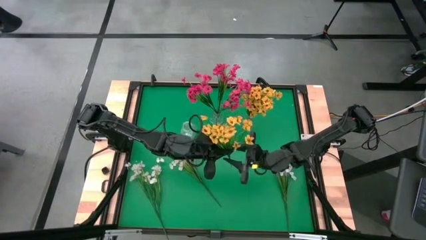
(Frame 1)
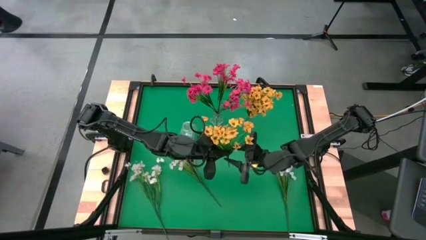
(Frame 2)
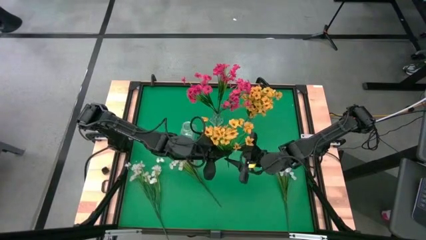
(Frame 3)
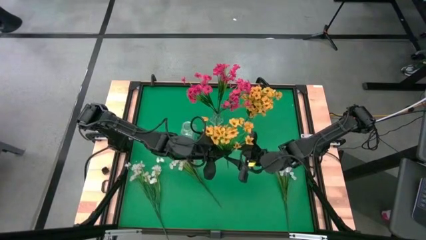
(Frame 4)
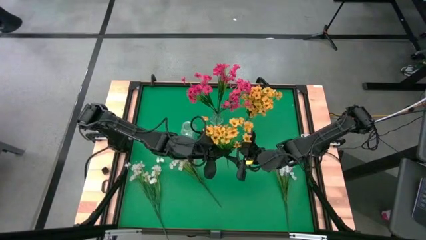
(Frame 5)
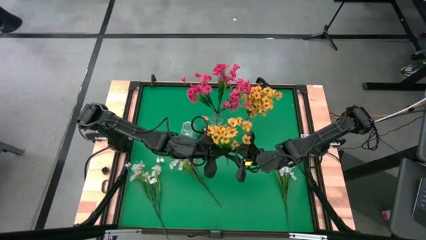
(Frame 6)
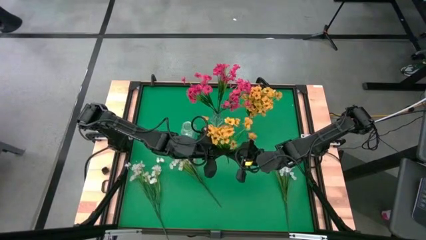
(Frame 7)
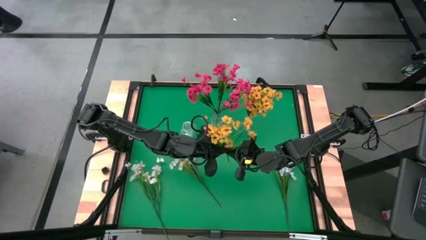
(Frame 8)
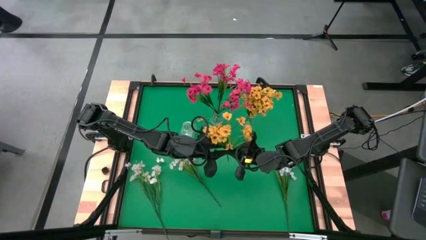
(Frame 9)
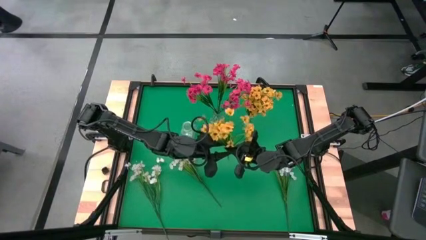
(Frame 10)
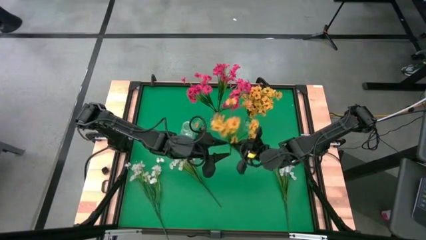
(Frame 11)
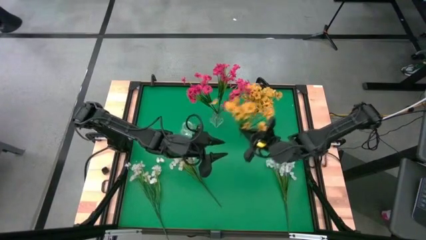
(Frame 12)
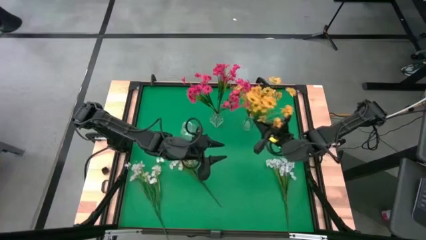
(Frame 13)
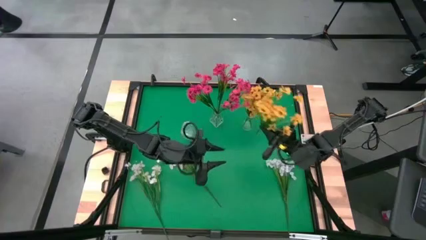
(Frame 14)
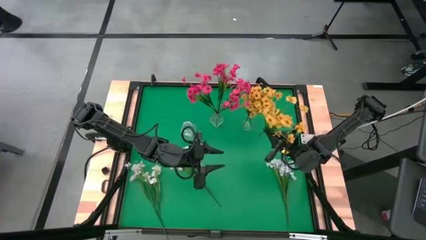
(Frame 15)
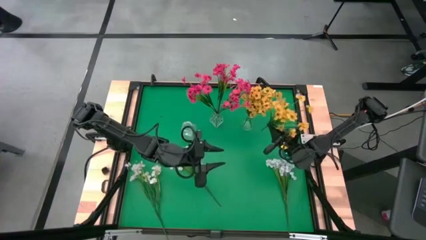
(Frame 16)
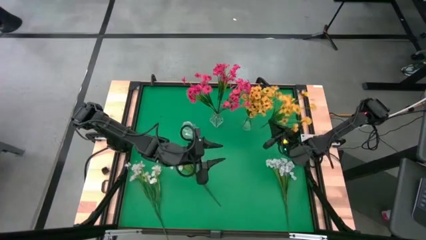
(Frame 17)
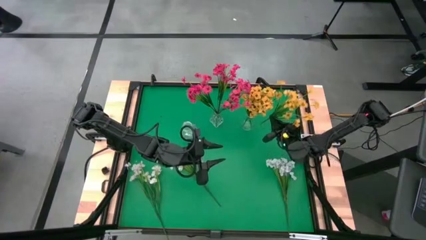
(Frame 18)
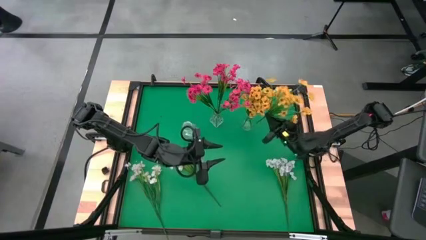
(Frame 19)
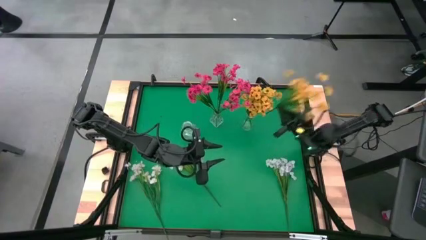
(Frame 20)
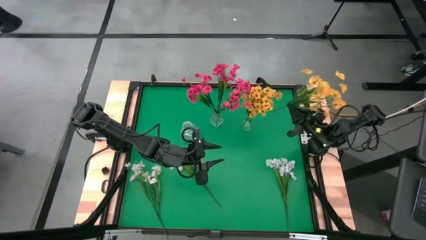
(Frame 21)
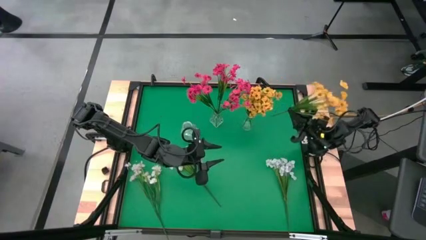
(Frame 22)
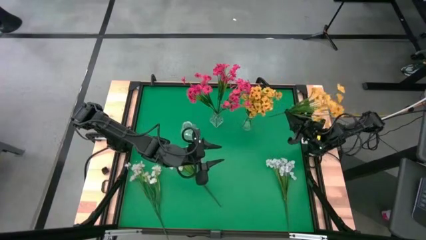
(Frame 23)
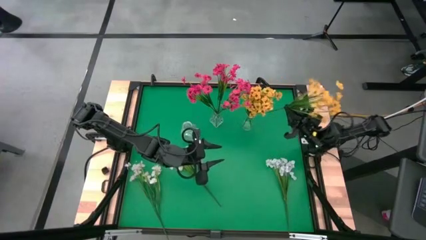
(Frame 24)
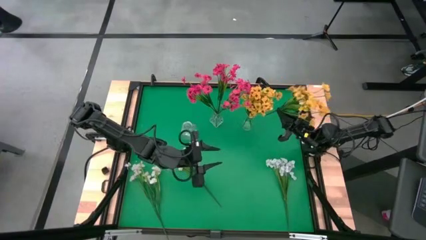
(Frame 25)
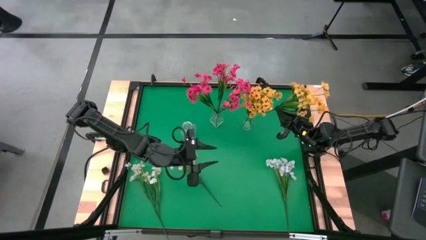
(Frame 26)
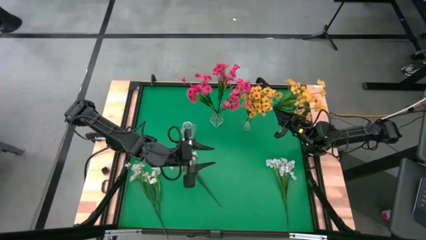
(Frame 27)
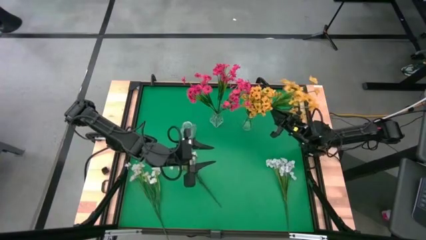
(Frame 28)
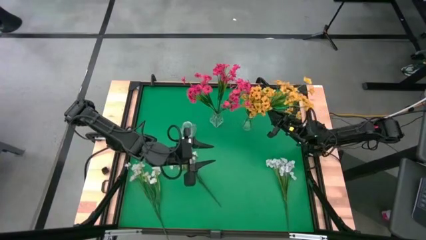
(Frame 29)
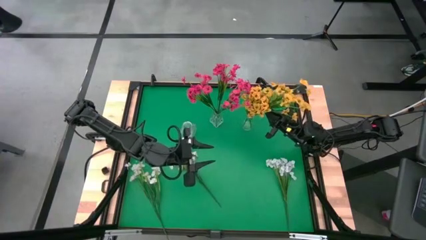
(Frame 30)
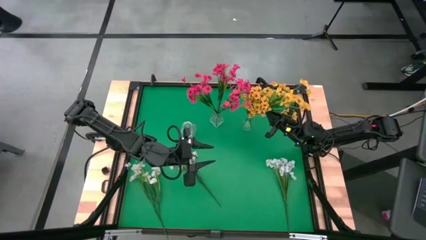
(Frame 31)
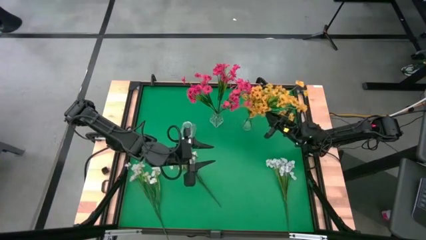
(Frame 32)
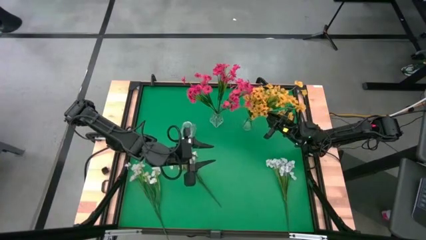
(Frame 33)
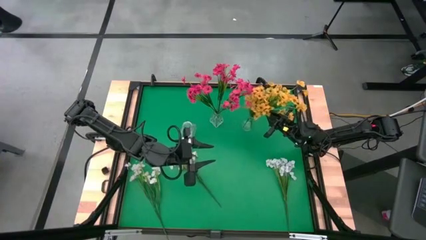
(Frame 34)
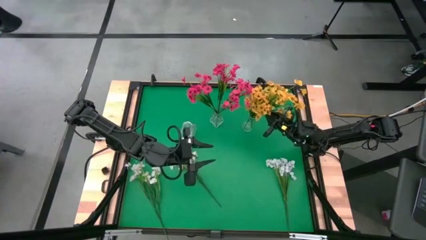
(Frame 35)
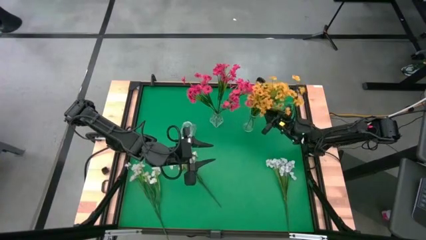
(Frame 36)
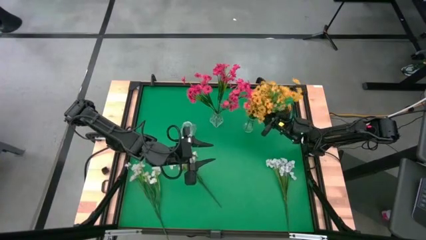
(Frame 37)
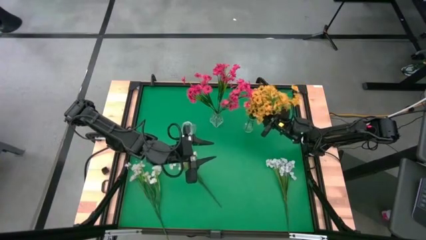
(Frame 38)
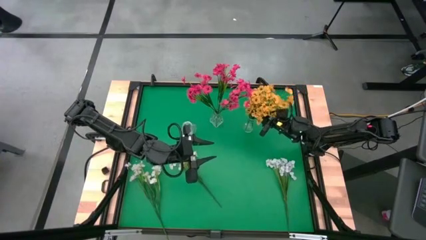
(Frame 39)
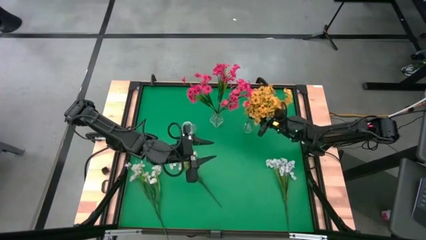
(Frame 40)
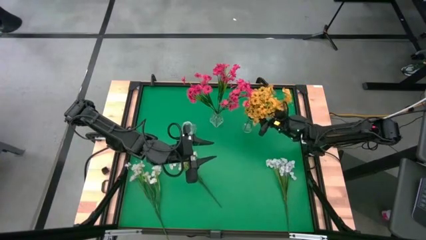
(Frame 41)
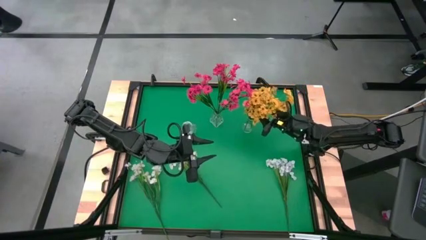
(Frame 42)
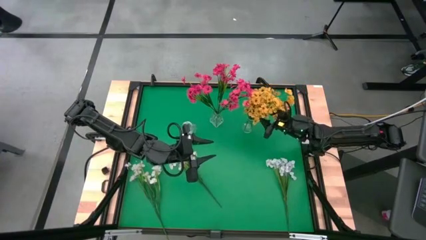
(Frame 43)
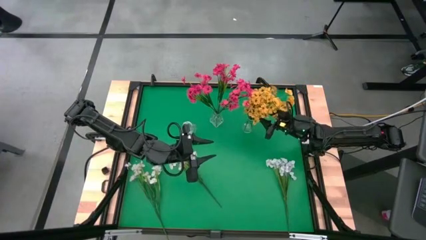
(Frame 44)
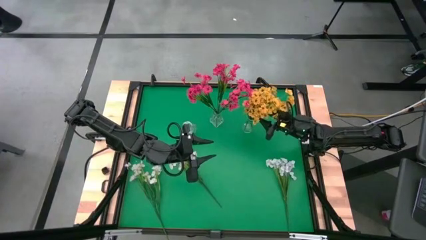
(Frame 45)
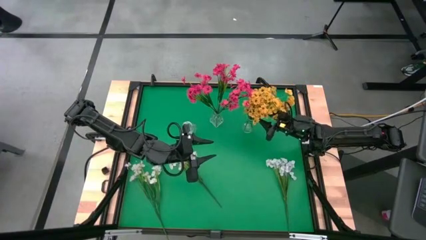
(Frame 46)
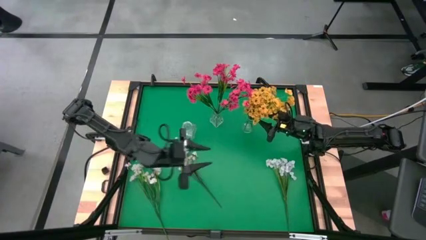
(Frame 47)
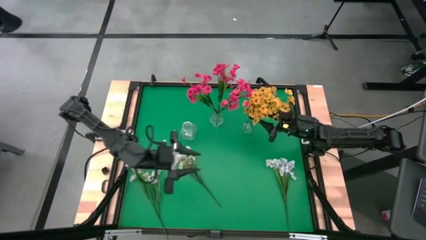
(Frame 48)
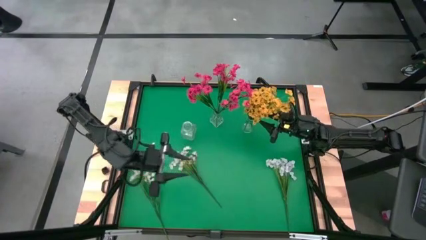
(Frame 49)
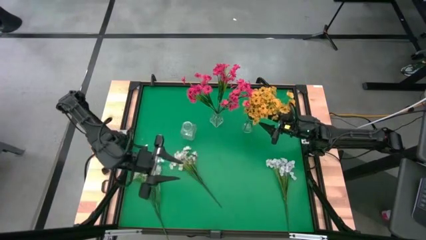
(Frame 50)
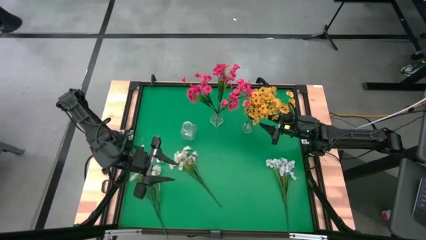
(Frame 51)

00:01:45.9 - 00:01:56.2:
Task: Sort flowers into vase by color
Put the yellow flower into the right transparent vase
